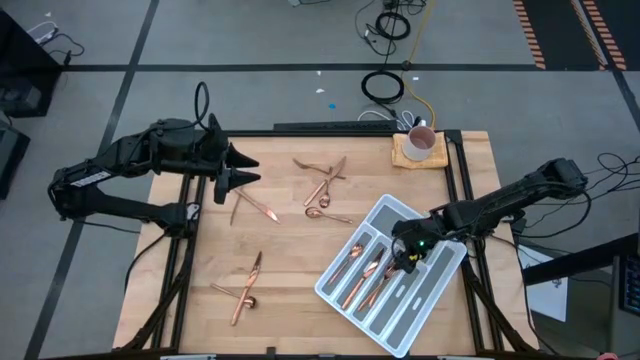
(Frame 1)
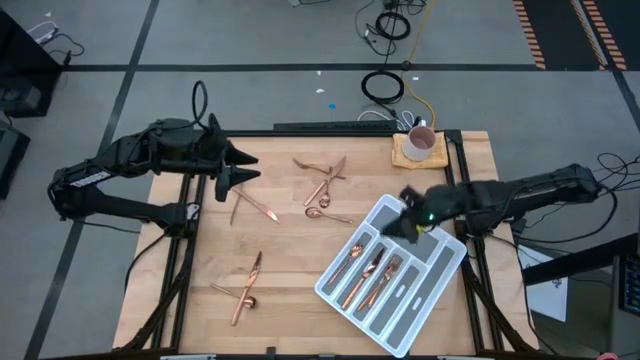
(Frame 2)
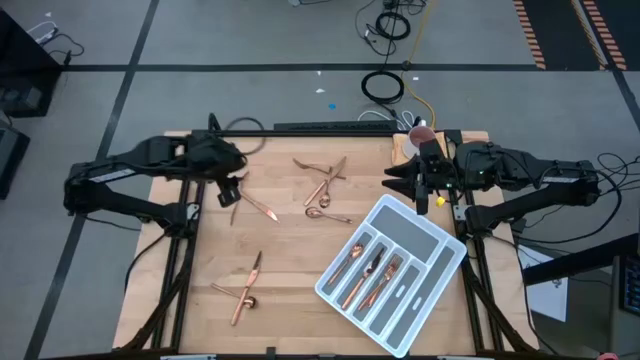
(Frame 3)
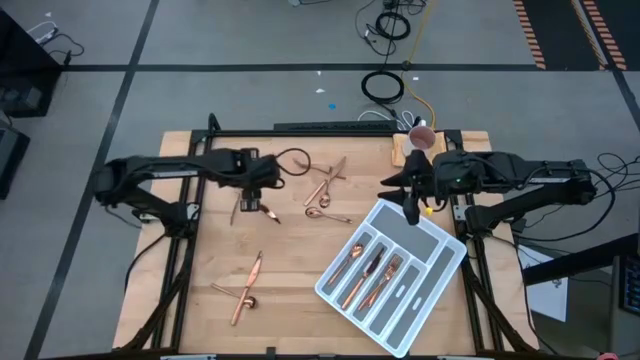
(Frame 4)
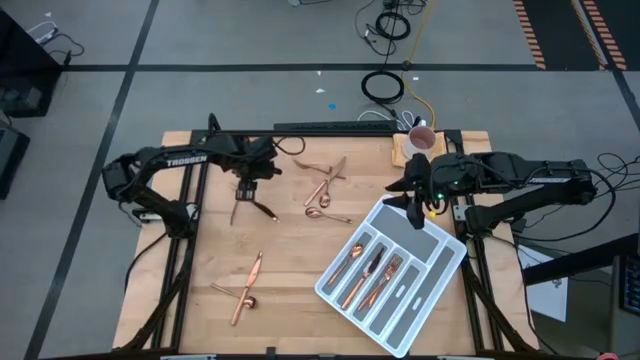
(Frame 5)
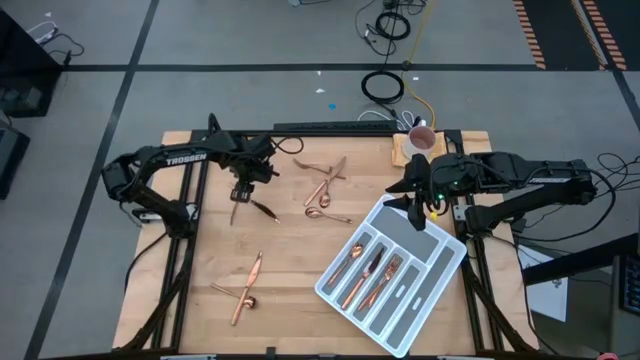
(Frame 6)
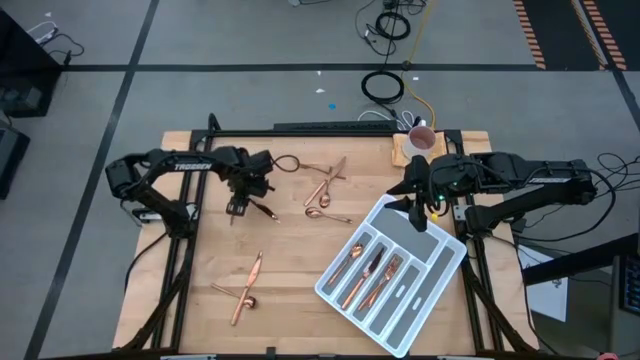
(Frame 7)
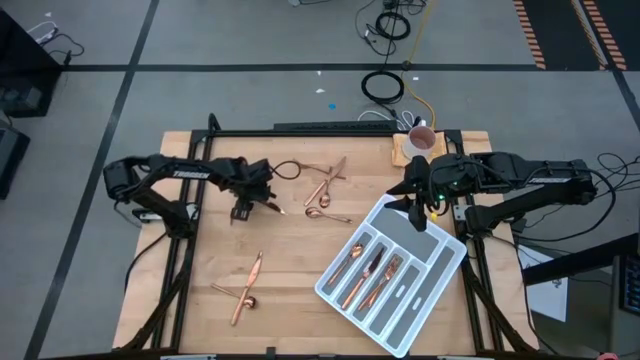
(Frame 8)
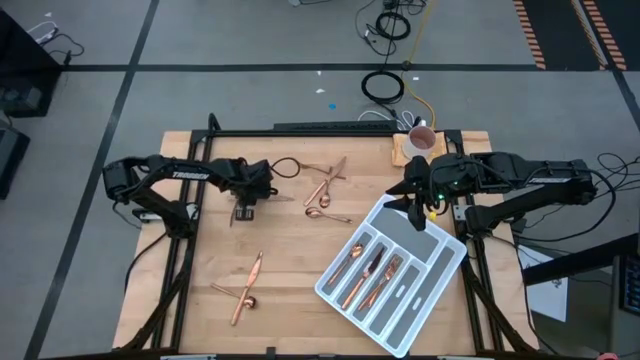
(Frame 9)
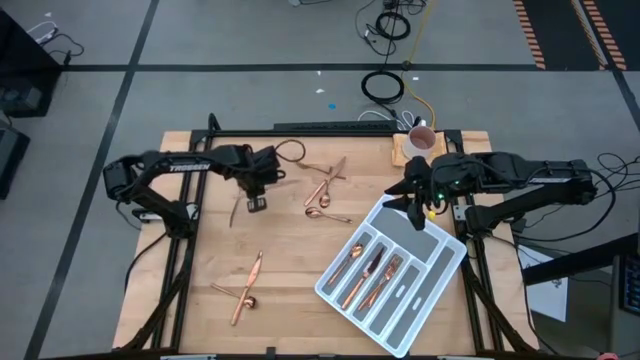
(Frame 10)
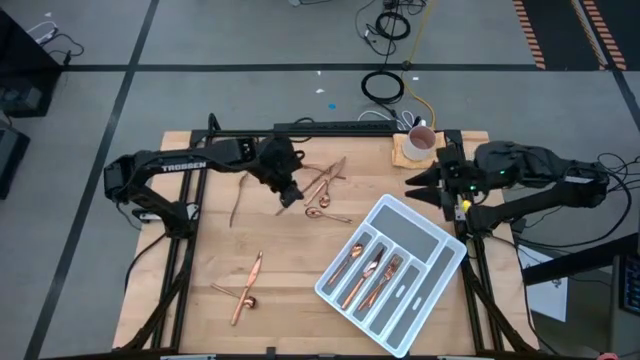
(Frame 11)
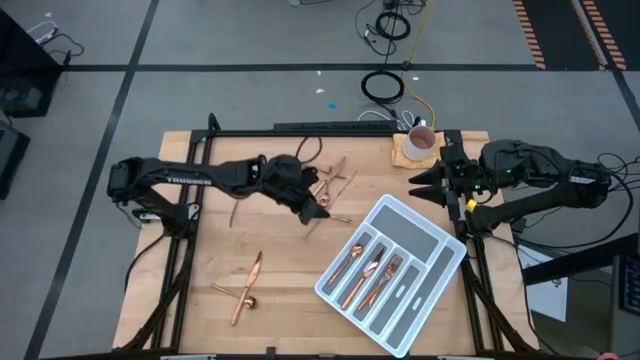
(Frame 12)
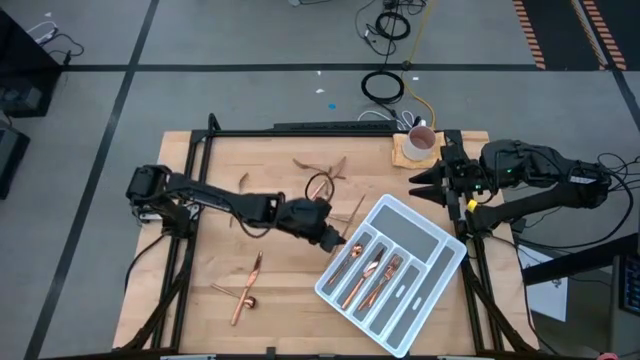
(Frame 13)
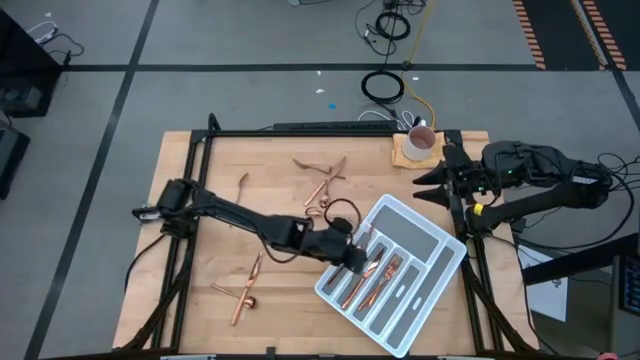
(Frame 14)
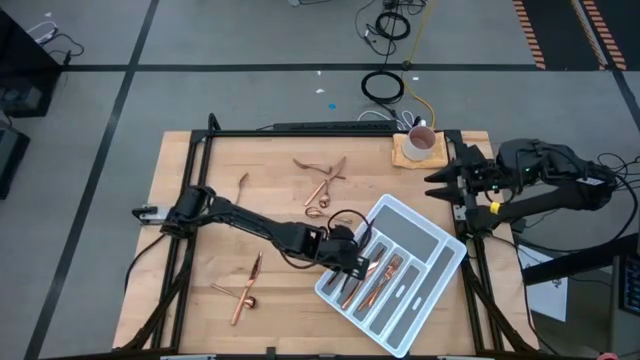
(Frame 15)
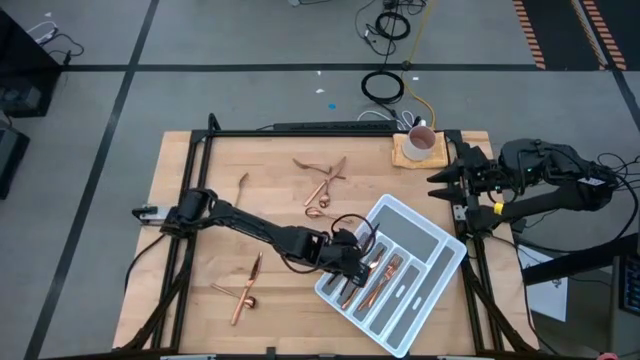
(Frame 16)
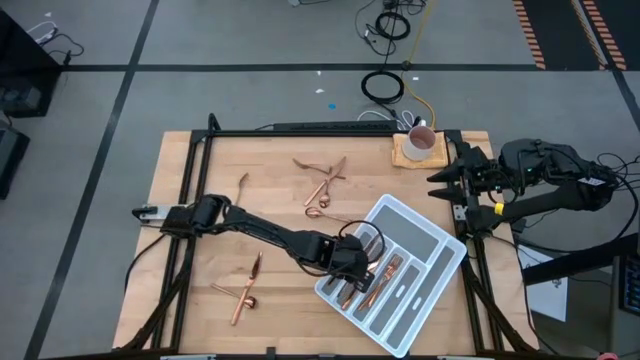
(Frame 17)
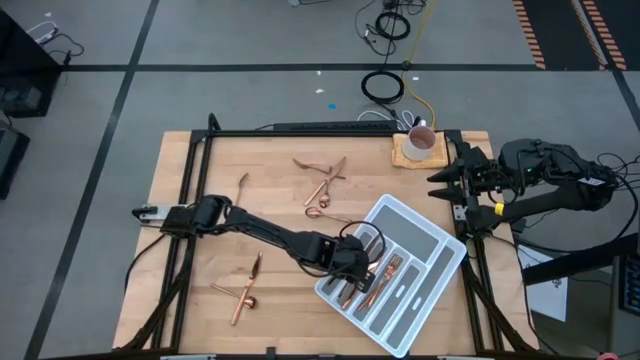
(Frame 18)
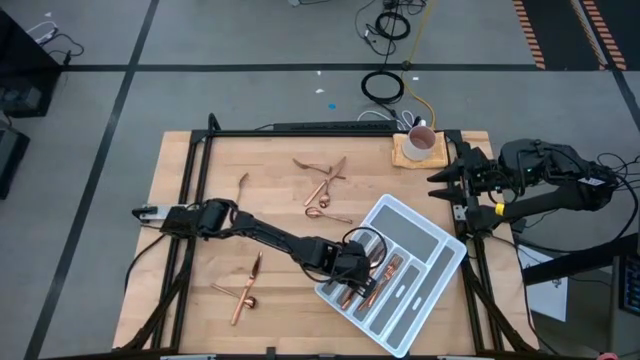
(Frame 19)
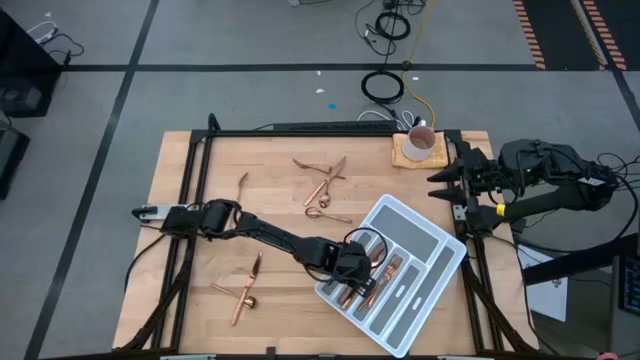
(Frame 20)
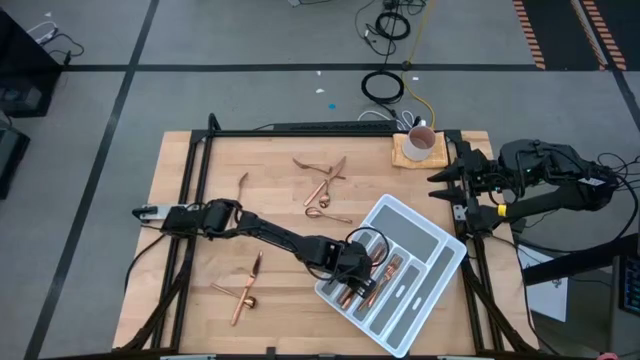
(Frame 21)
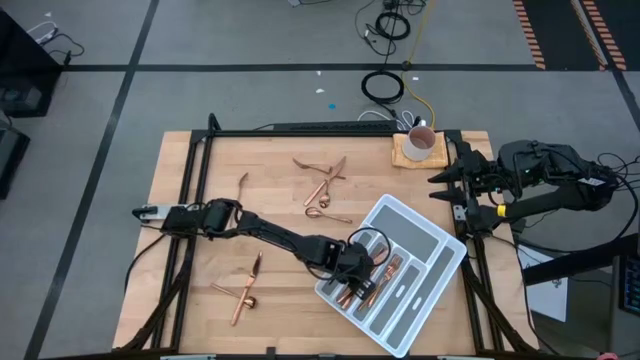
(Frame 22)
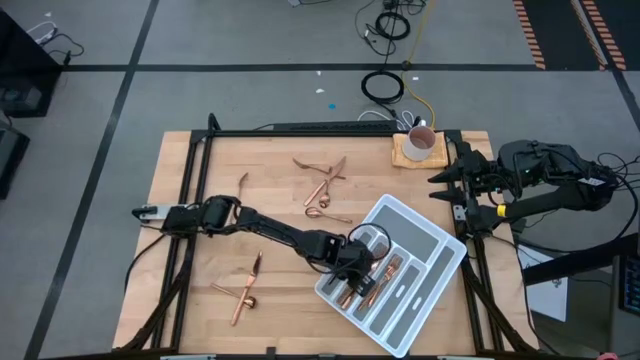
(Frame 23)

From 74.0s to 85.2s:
Task: Sort silverware
Put the gold table knife into the cutlery tray with the other gold table knife

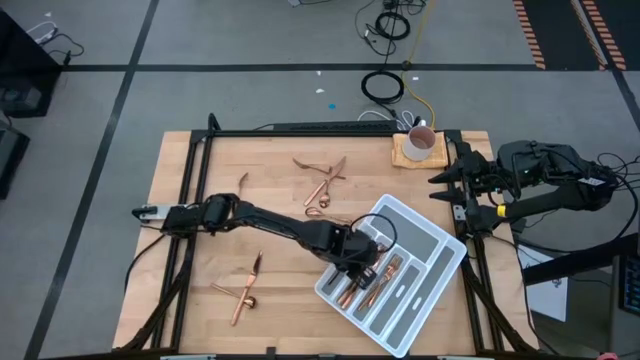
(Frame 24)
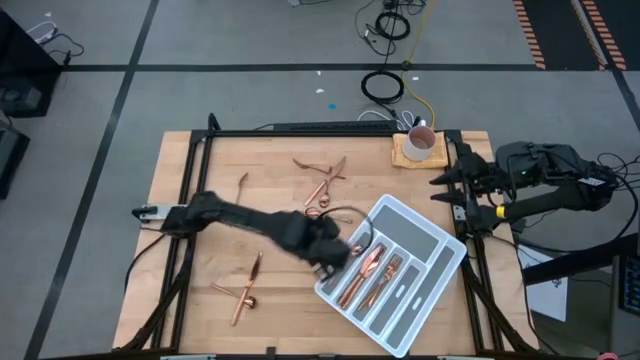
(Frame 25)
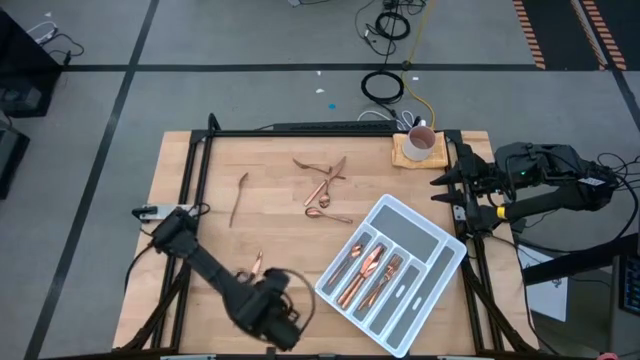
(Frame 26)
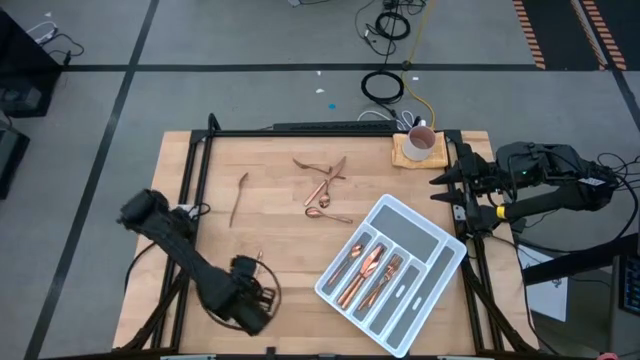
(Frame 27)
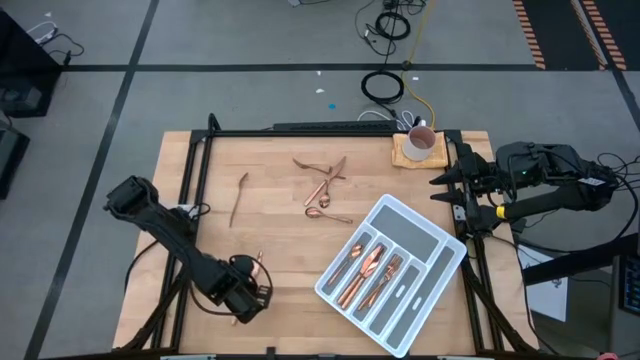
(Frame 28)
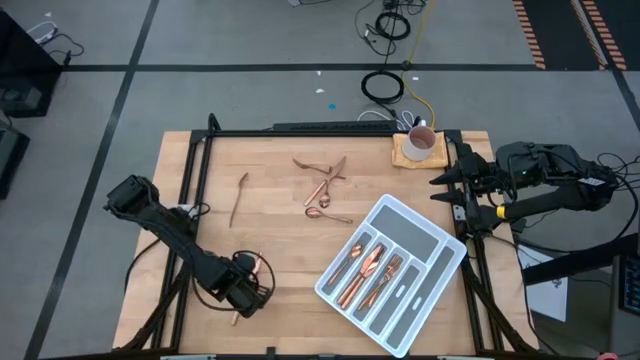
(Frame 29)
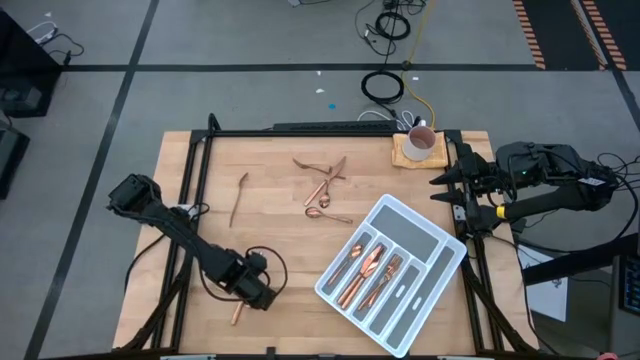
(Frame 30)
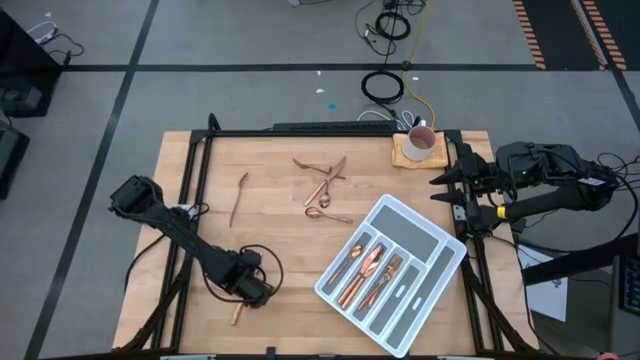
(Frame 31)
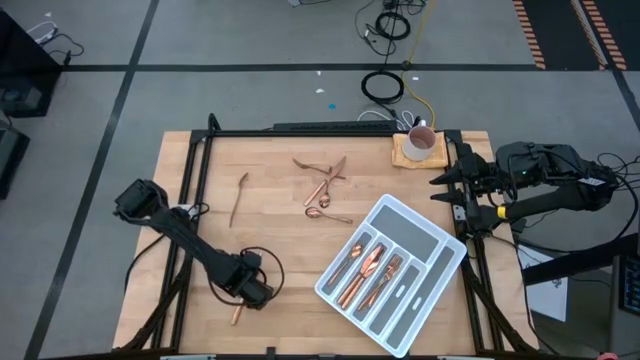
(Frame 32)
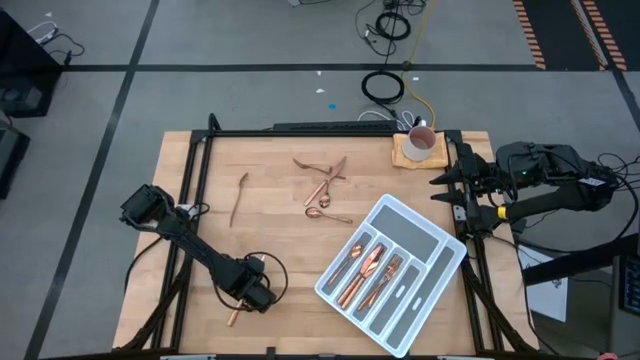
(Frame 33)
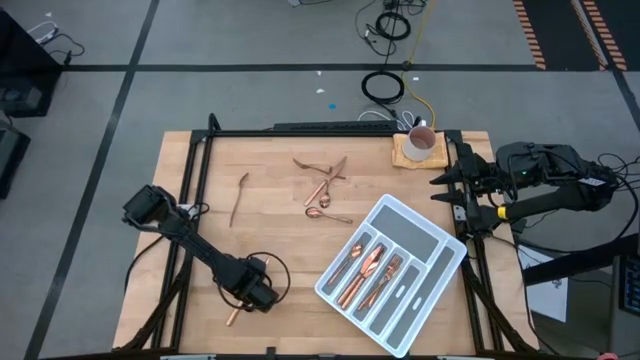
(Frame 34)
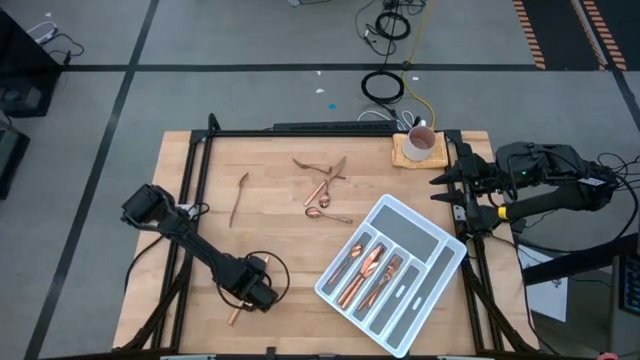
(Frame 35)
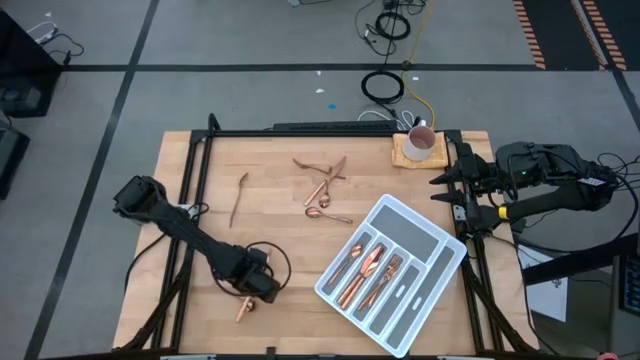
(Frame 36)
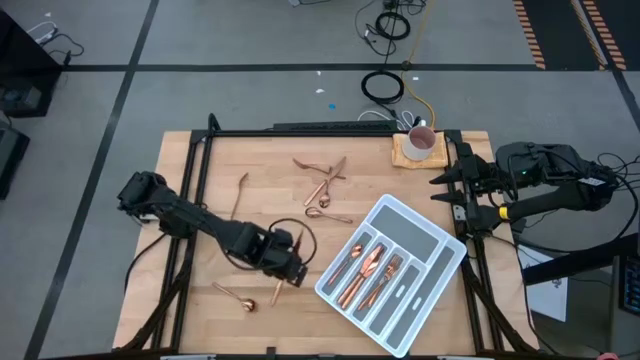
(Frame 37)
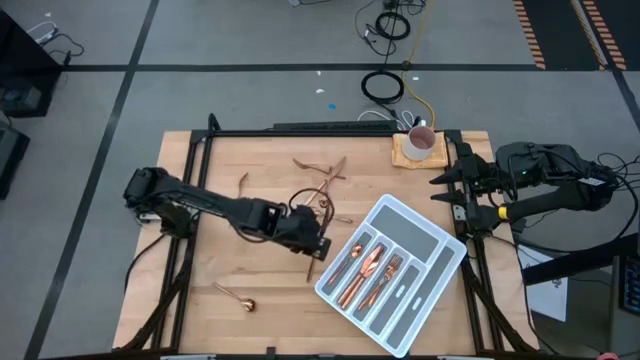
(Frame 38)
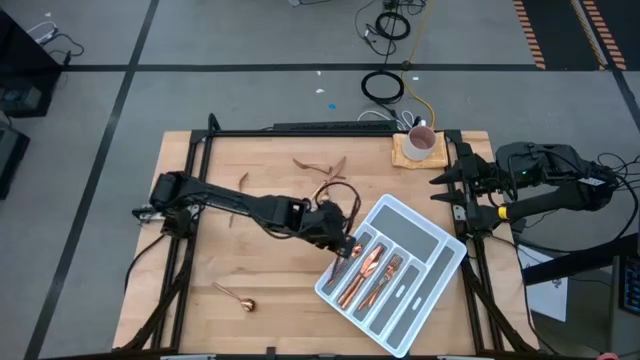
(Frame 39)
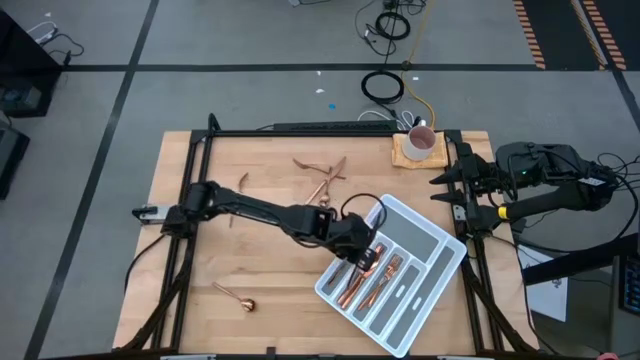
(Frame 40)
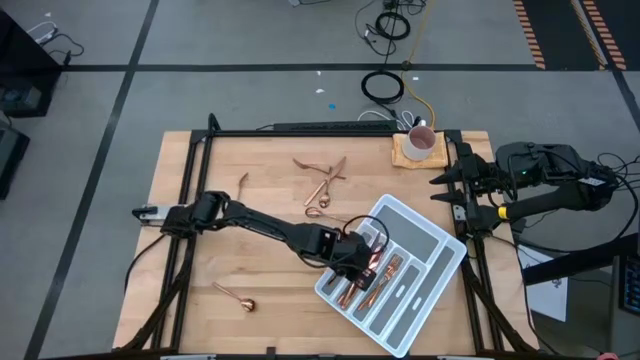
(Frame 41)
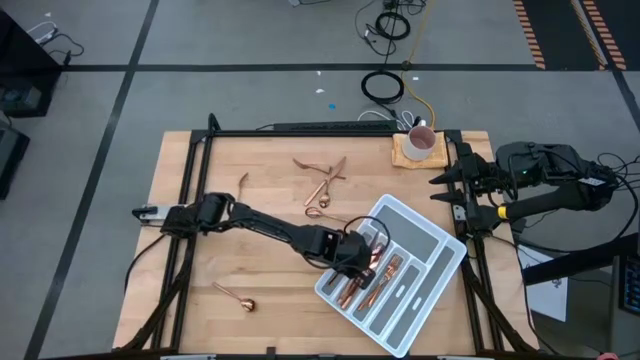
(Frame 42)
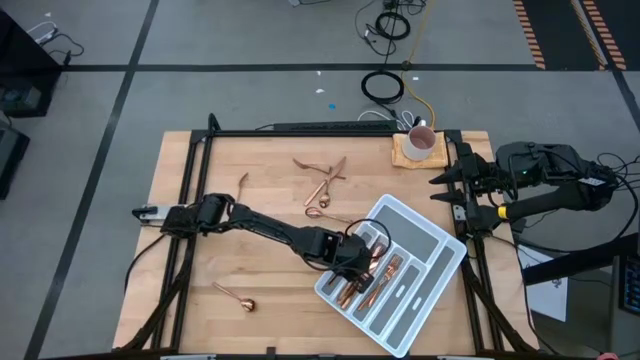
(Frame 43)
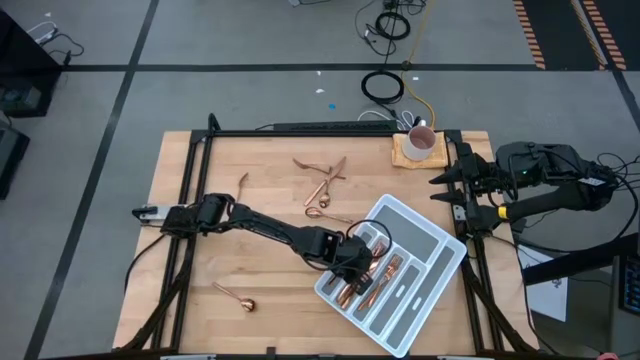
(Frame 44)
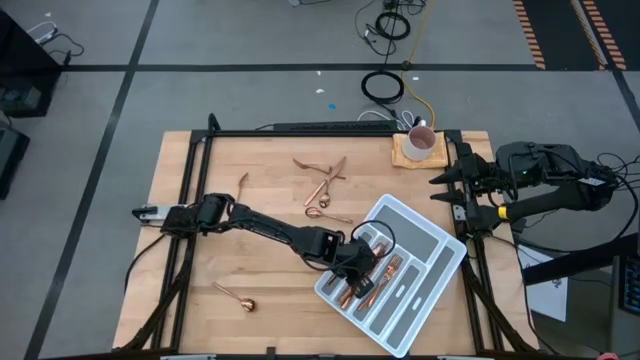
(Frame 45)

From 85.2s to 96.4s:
Put the gold table knife into the cutlery tray with the other gold table knives
